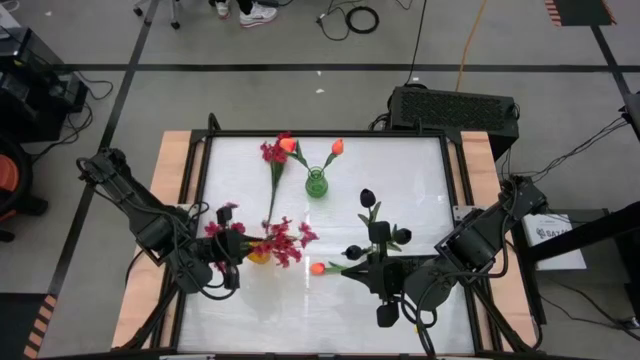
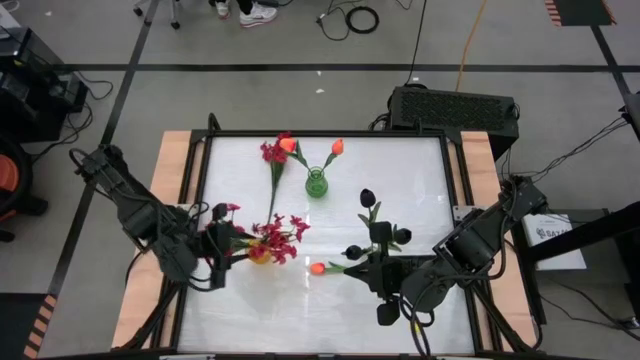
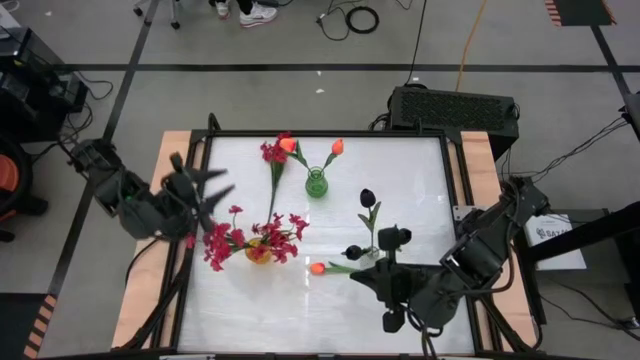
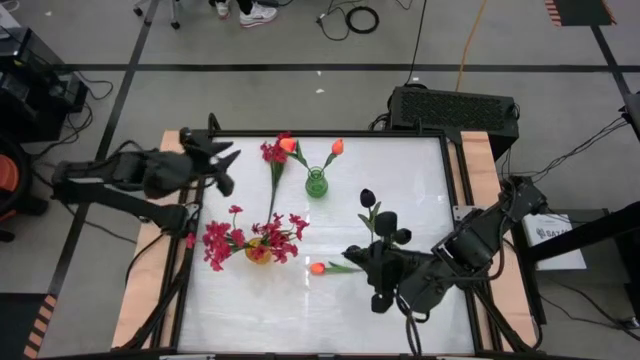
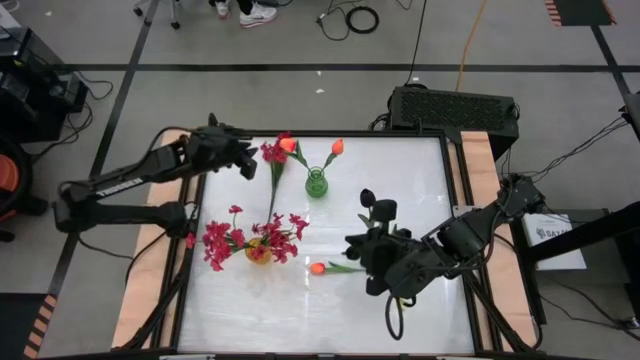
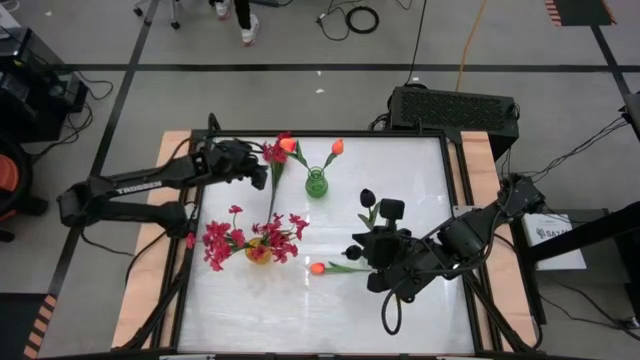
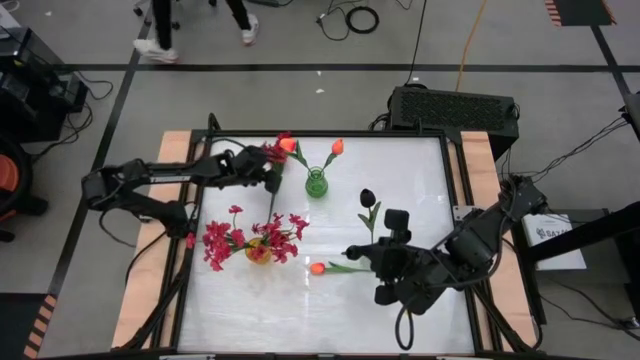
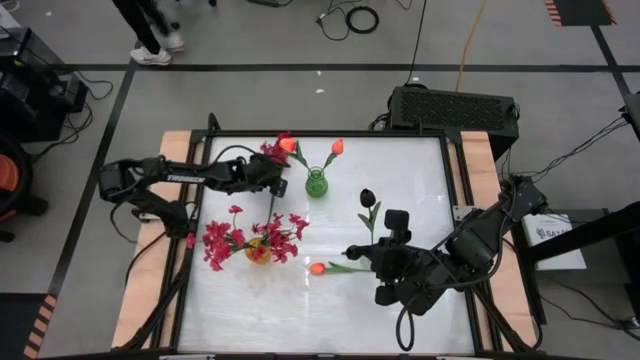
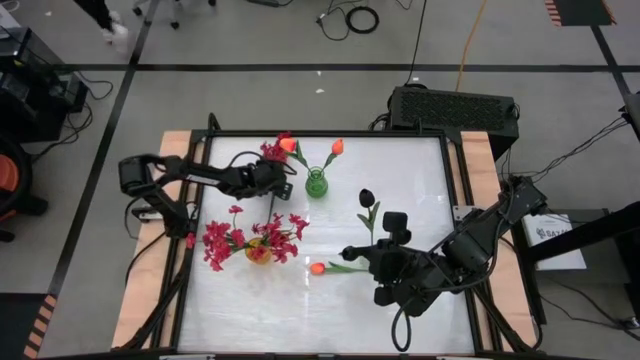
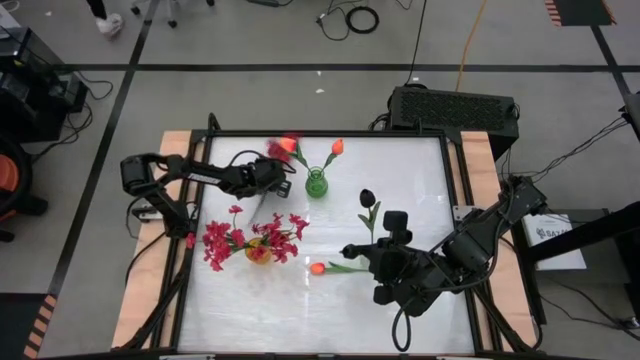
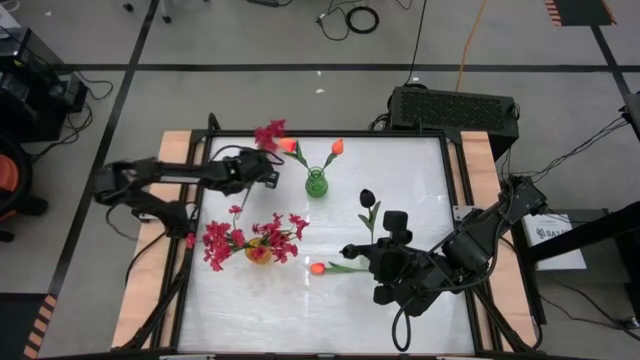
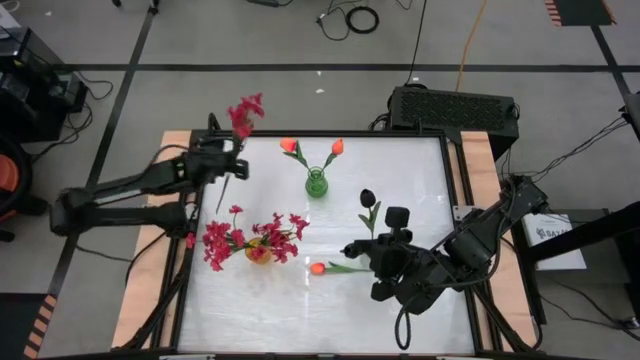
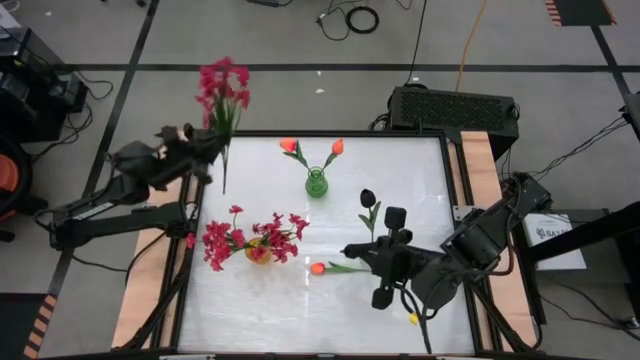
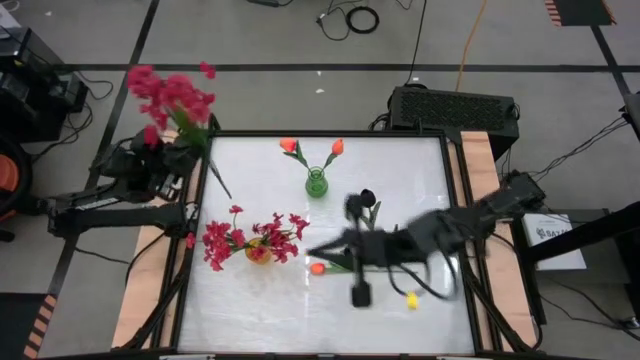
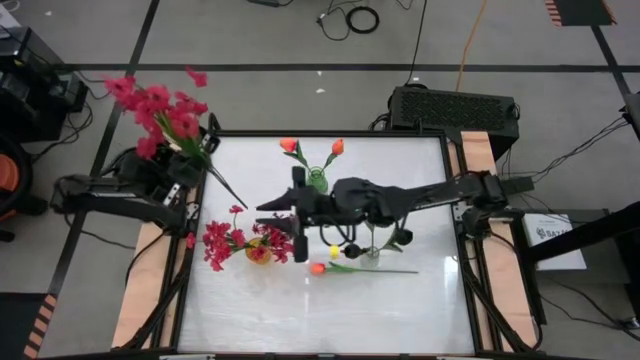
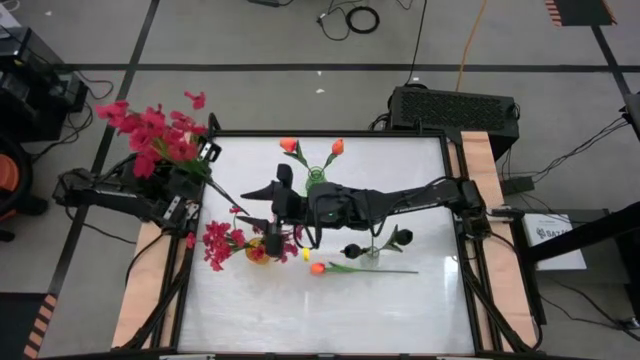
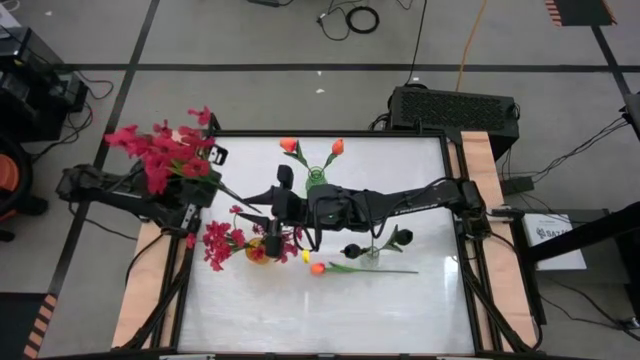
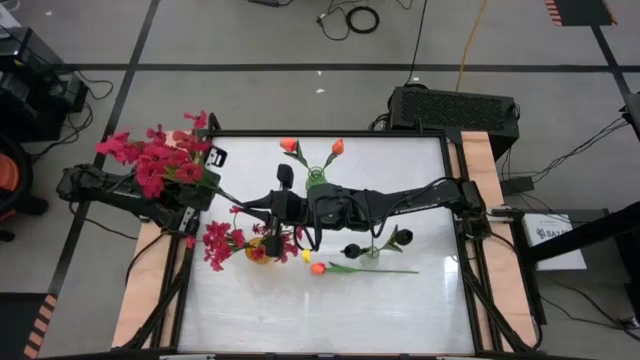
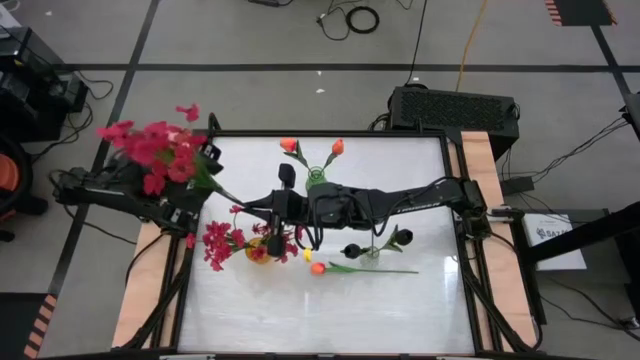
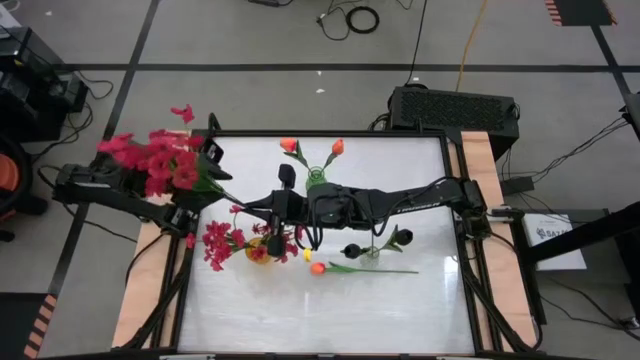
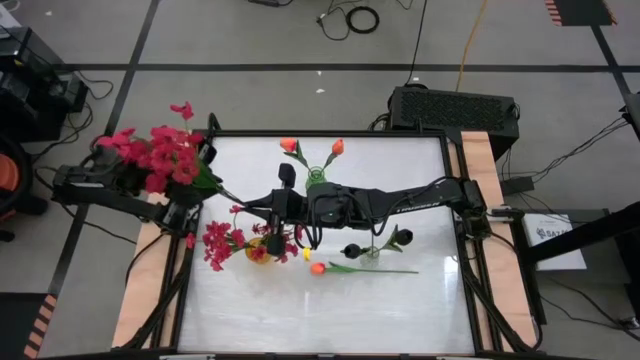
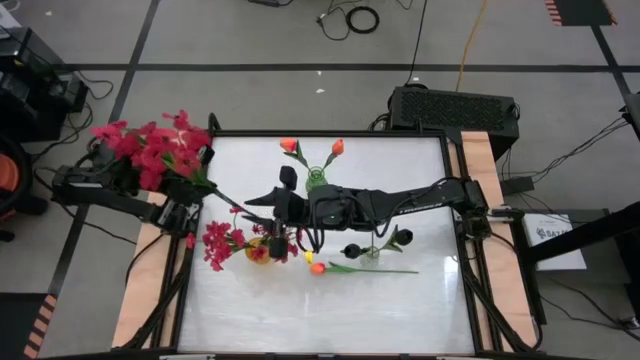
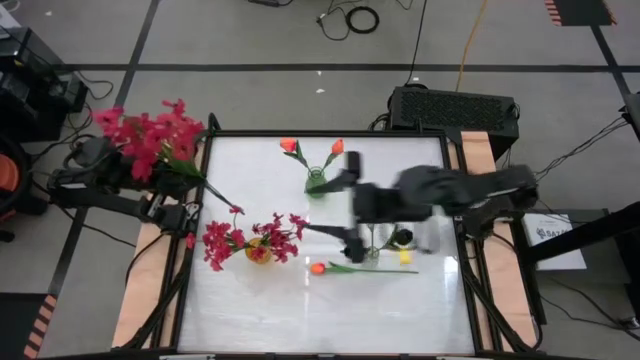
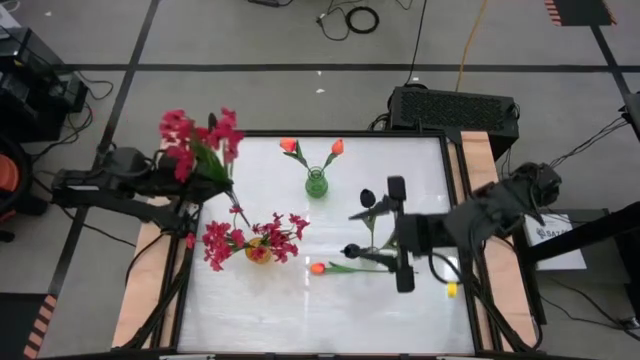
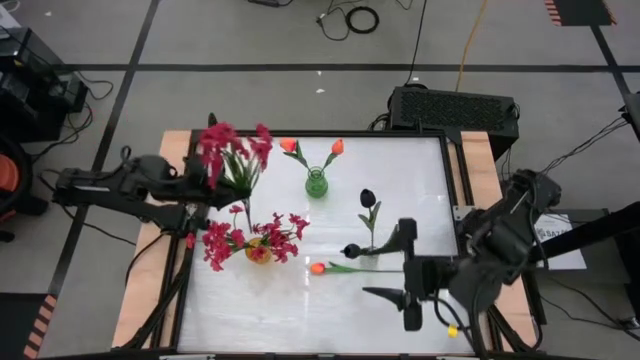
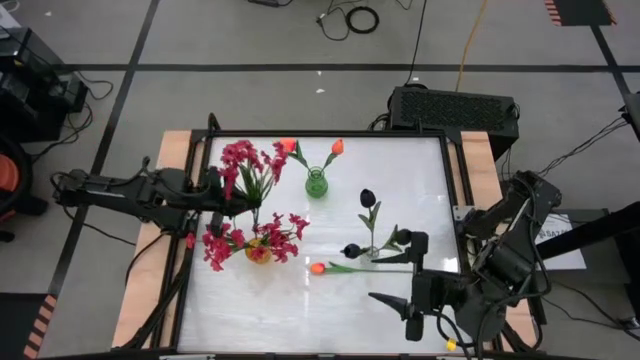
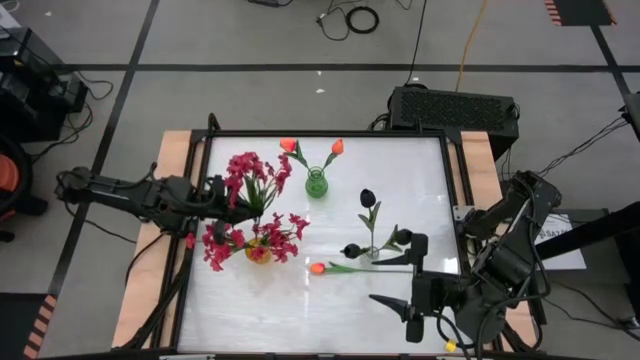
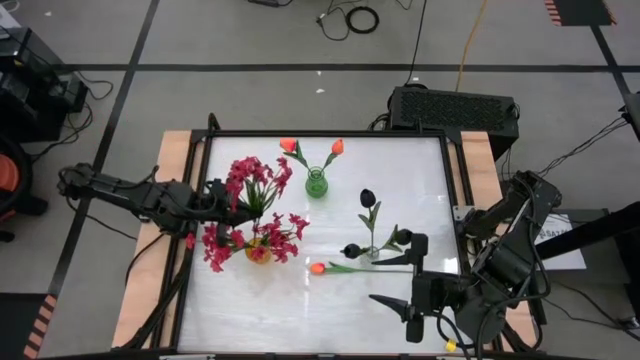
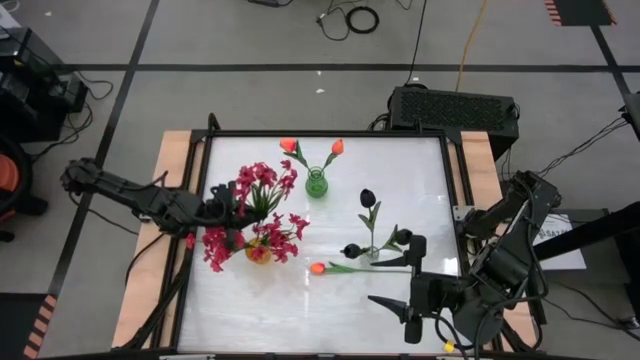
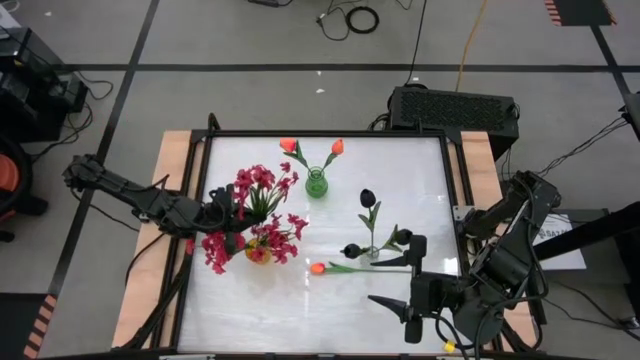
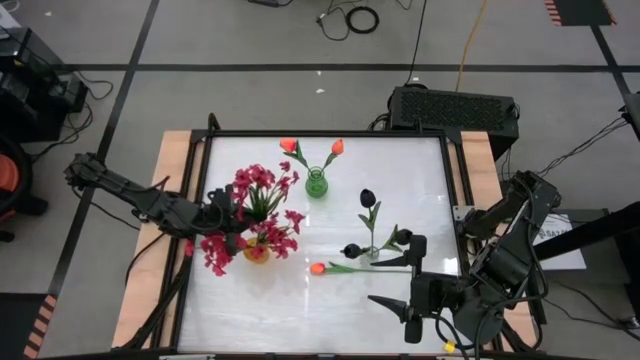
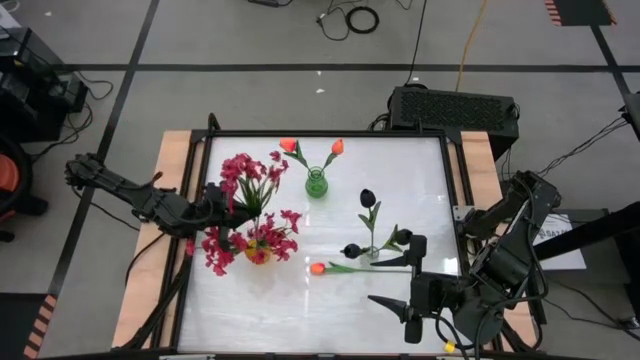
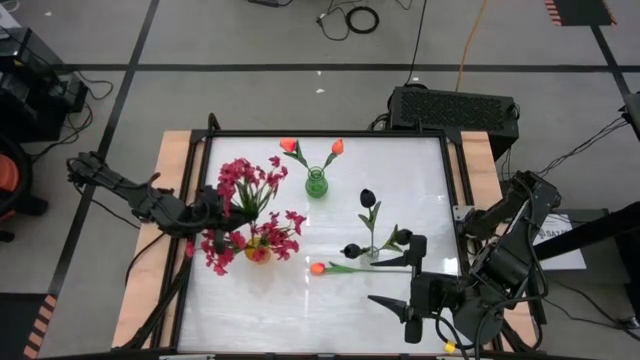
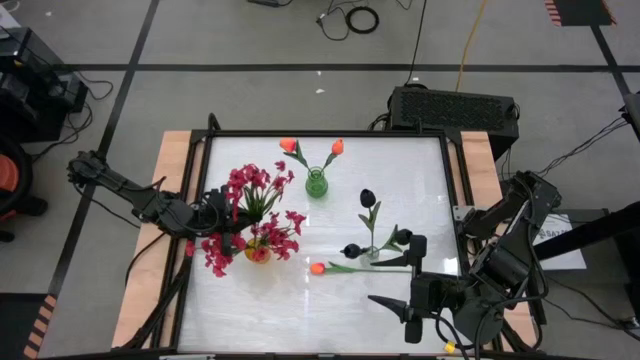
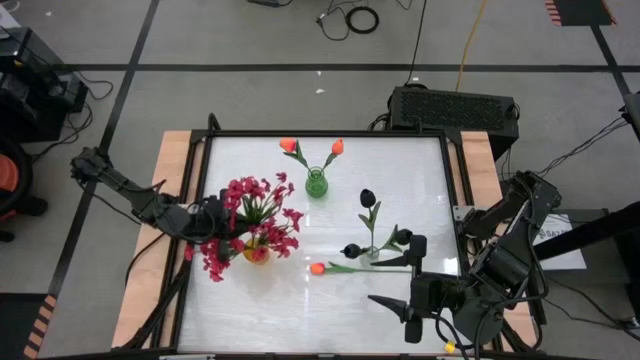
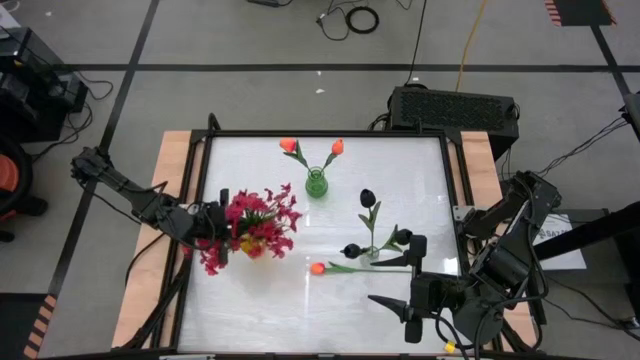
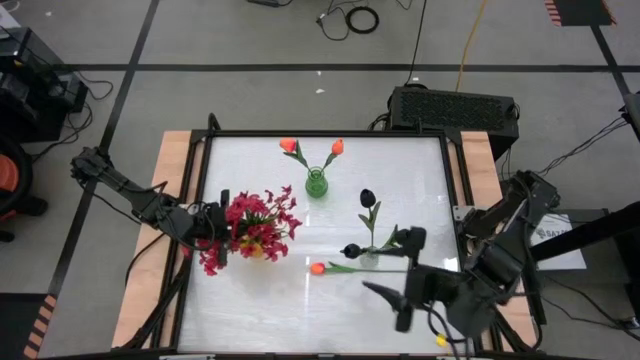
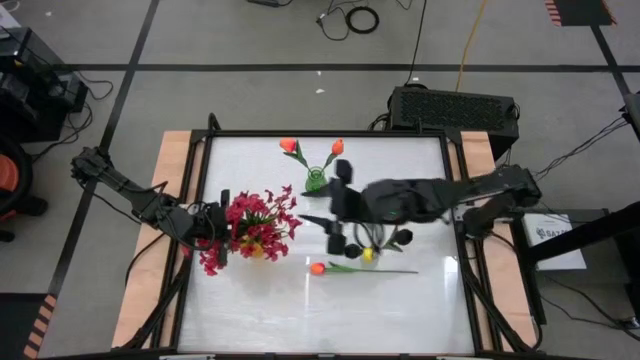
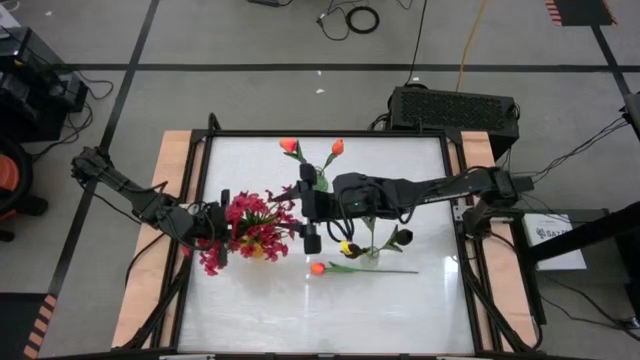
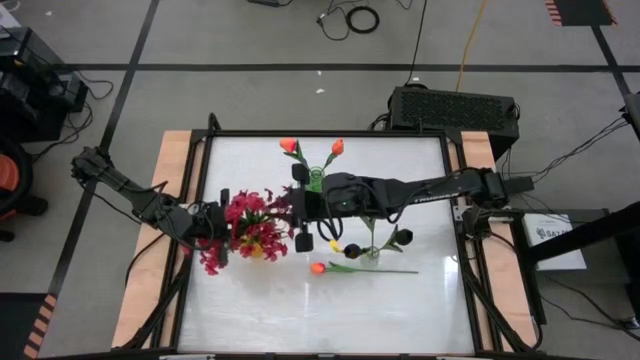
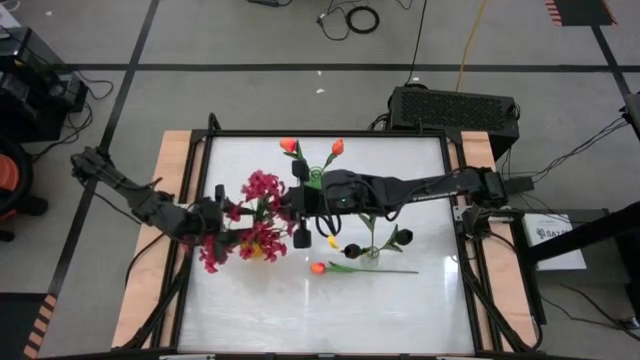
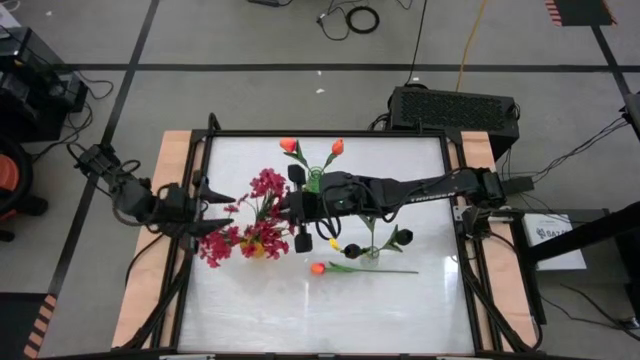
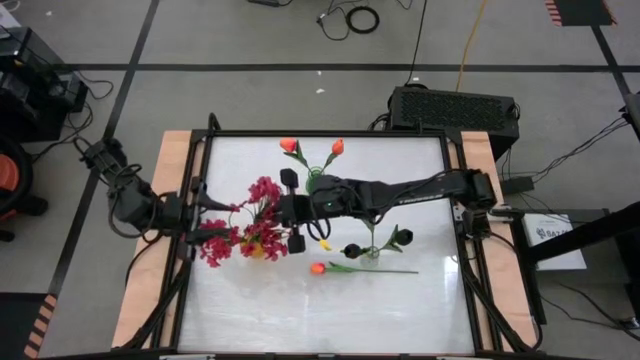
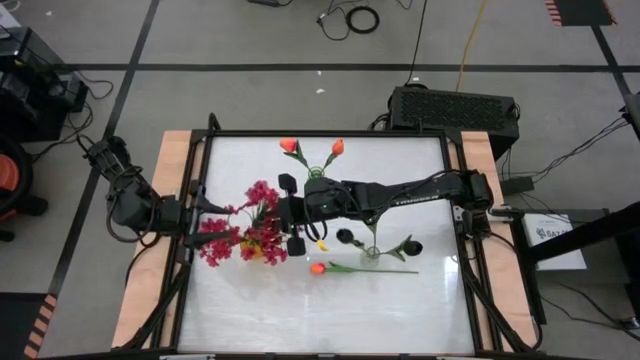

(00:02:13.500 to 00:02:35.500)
Task: Sort flowers into vase by color
Put the red flowers into the yellow vase
